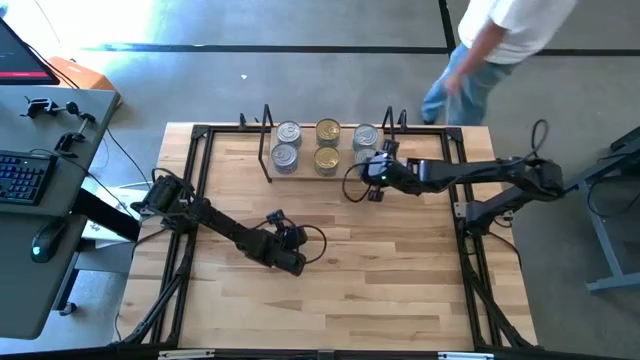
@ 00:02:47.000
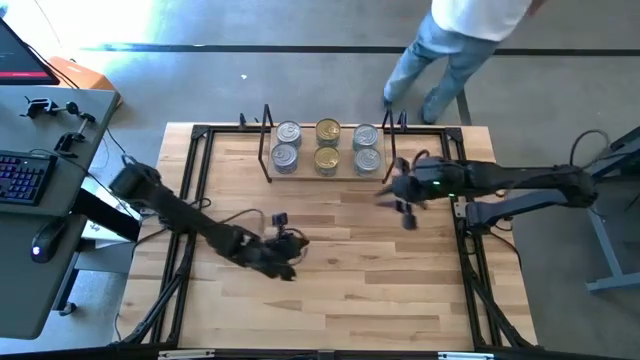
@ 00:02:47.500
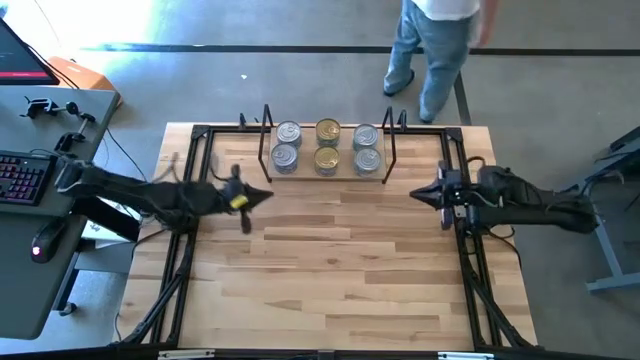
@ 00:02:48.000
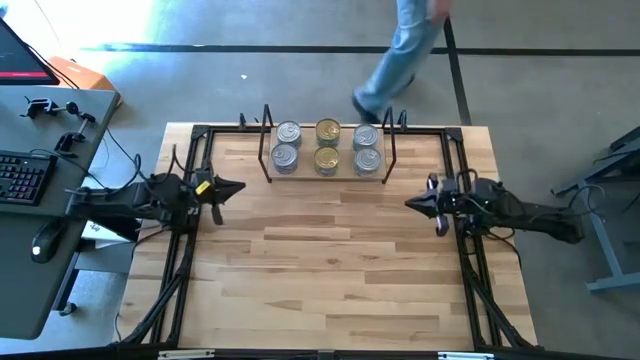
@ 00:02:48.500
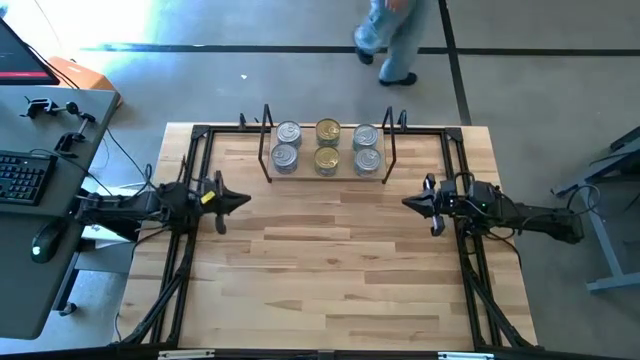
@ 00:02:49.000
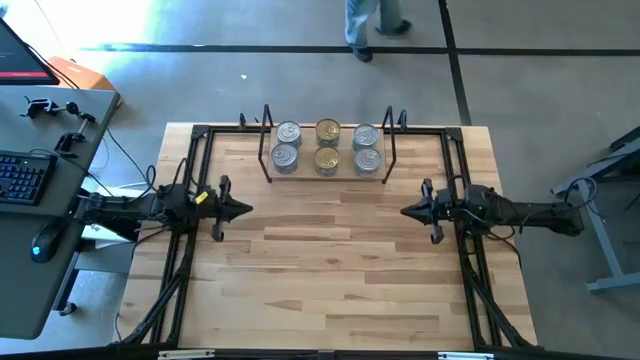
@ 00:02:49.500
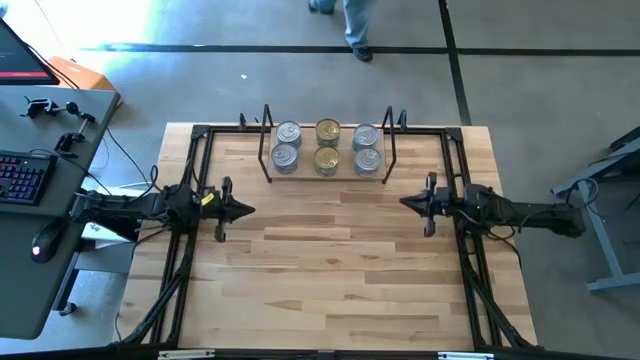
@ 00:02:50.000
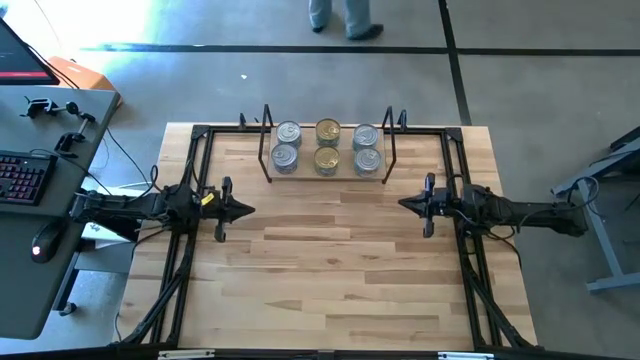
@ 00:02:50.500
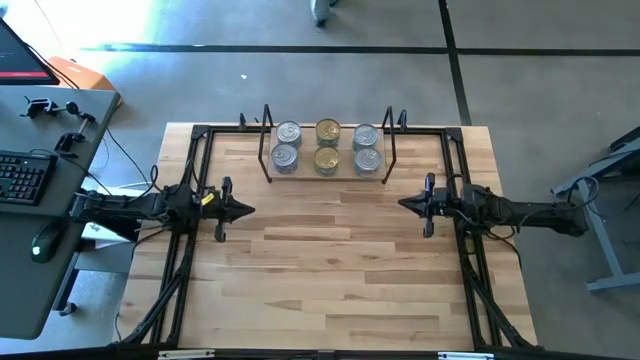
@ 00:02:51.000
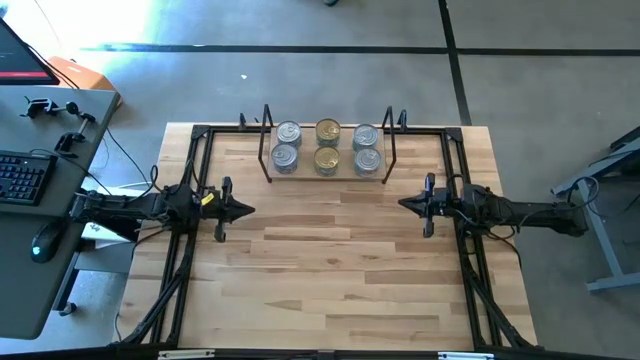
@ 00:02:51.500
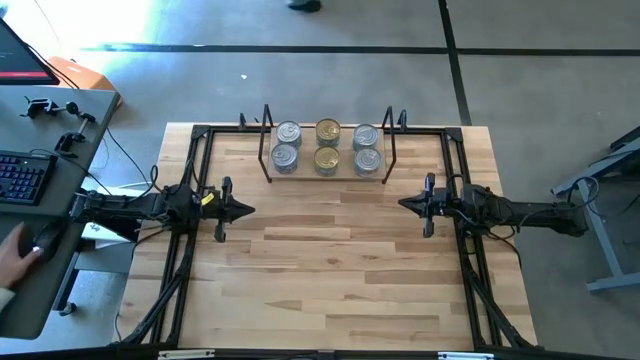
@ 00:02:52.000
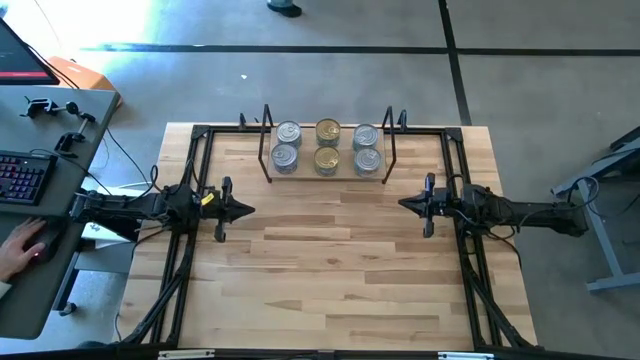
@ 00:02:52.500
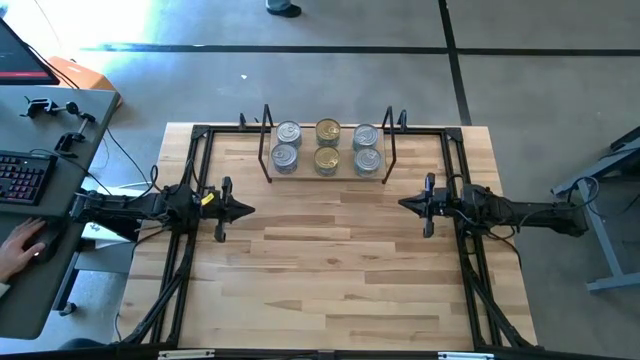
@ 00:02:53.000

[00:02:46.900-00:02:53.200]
Task: Stack canned seafood by type on shelf
Return to Home Position
